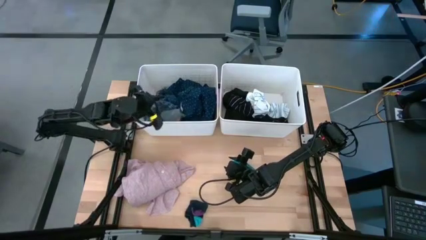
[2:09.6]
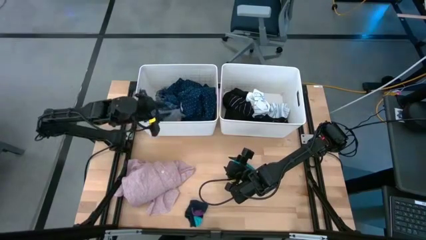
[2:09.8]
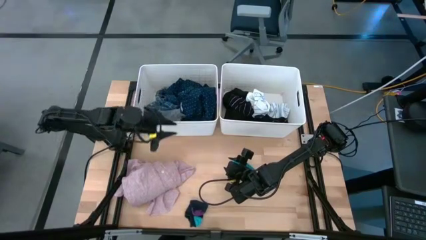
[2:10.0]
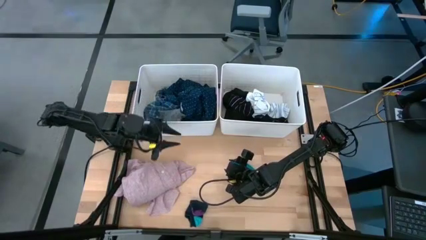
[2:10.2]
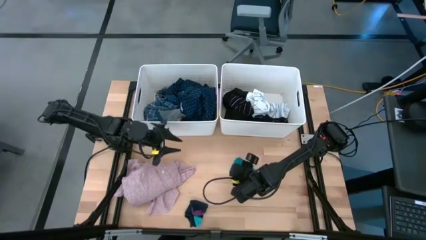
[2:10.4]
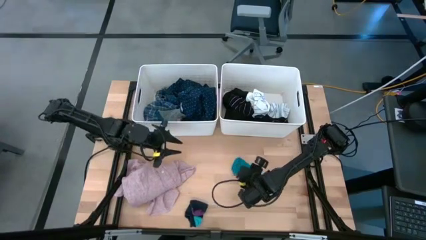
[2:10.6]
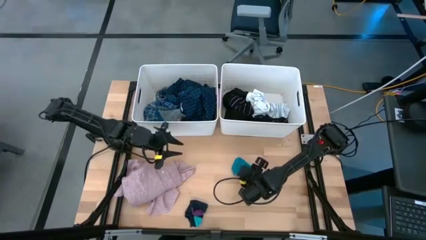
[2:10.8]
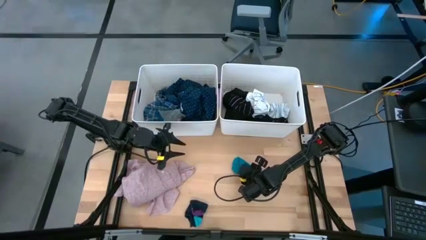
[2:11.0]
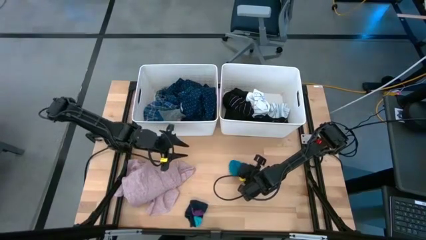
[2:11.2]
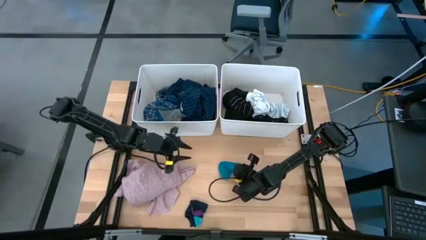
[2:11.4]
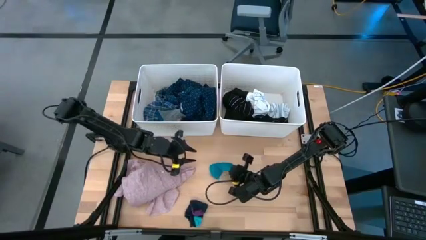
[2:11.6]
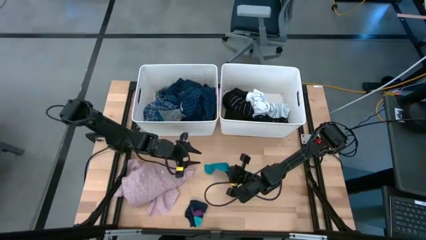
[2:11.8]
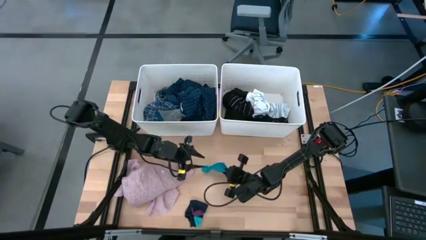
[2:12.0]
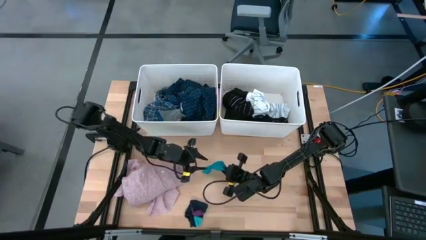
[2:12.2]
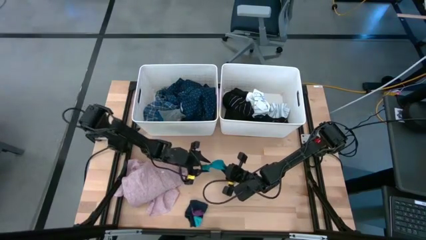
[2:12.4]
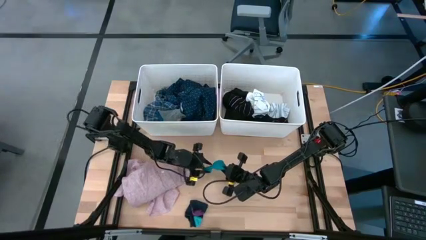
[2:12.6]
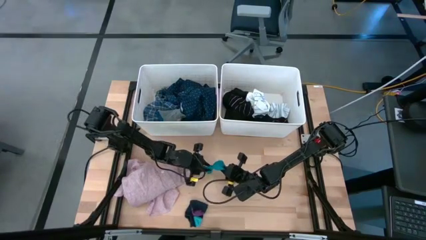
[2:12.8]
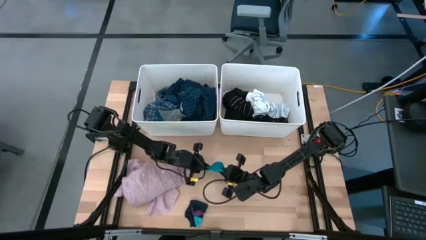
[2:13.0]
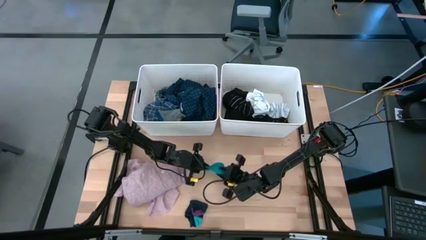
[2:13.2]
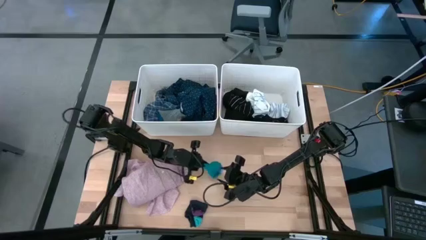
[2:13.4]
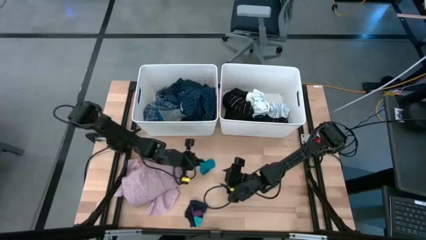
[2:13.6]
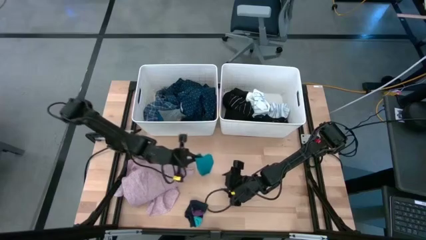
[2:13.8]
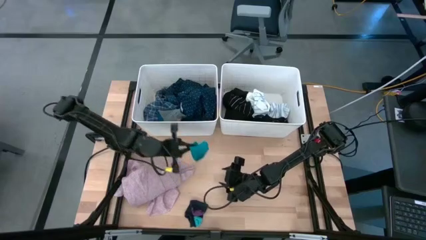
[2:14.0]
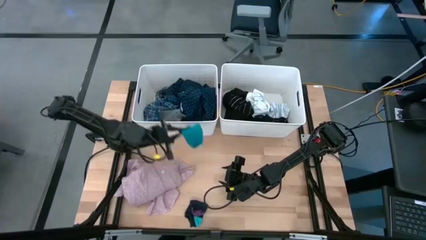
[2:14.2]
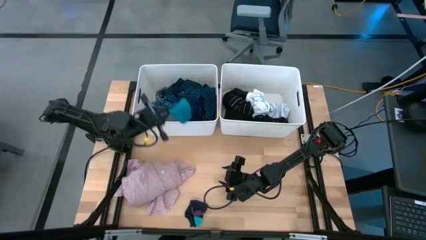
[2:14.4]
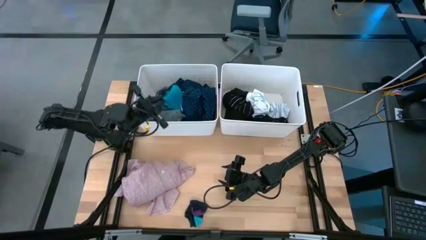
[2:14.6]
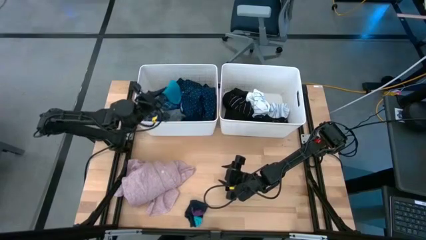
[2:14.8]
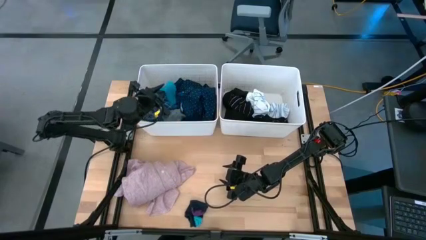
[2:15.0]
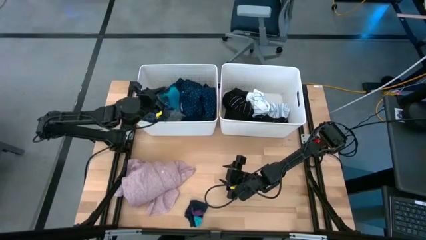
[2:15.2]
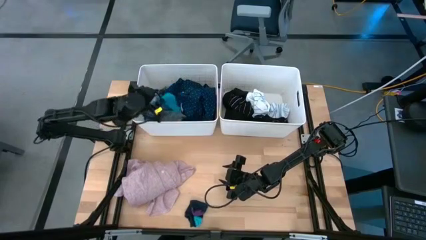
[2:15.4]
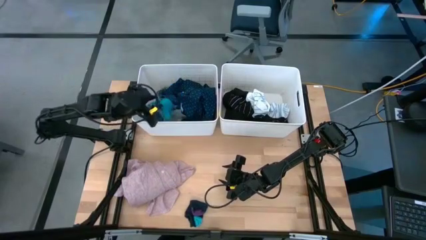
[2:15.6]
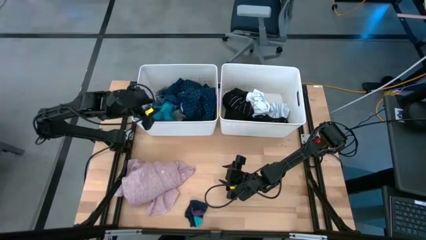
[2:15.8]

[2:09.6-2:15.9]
Task: Sort clothes
Put the blue sock into the left white bin

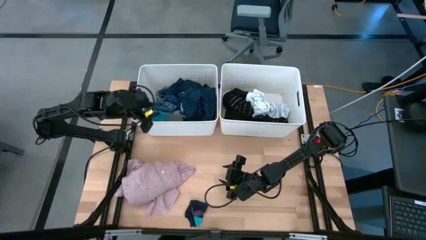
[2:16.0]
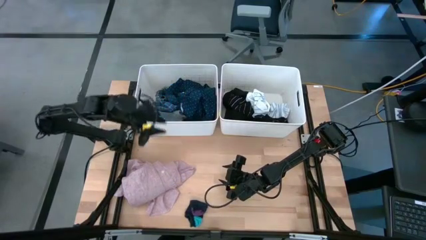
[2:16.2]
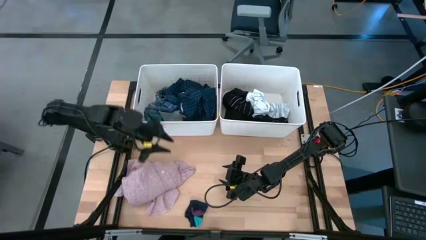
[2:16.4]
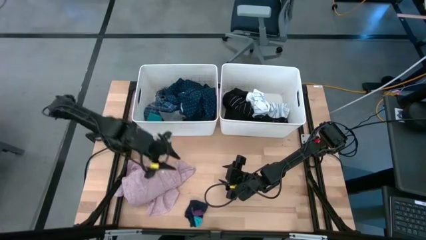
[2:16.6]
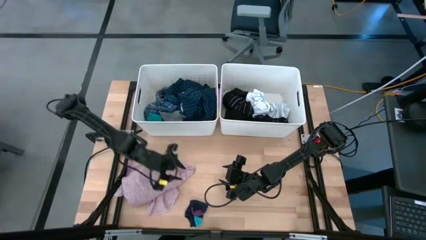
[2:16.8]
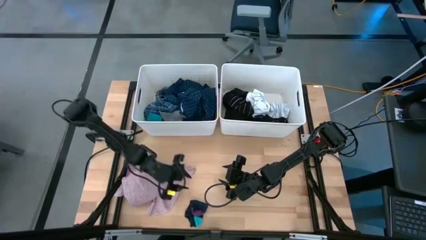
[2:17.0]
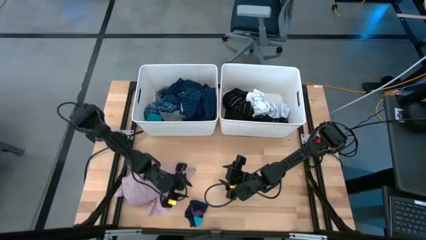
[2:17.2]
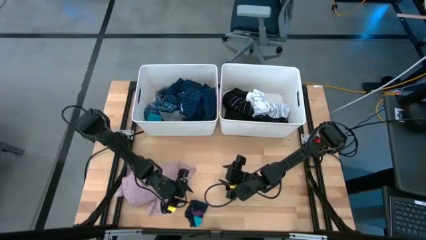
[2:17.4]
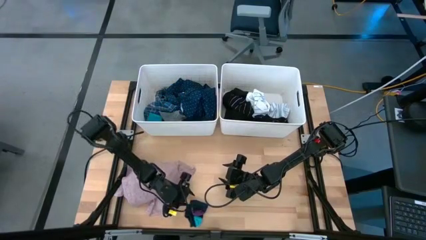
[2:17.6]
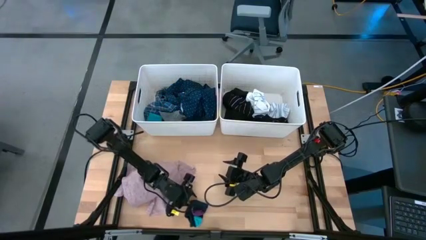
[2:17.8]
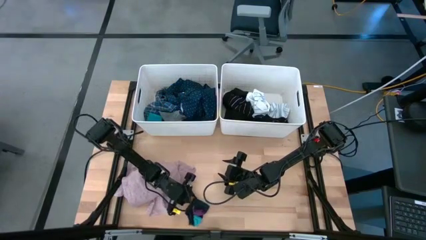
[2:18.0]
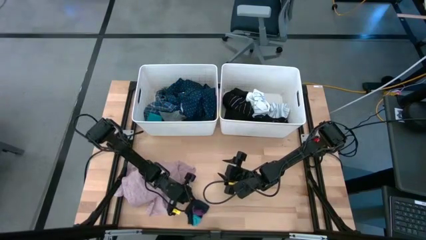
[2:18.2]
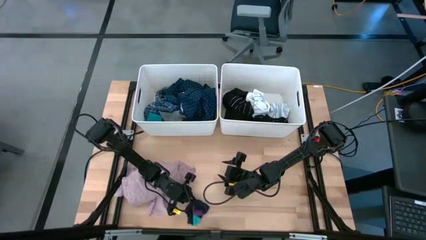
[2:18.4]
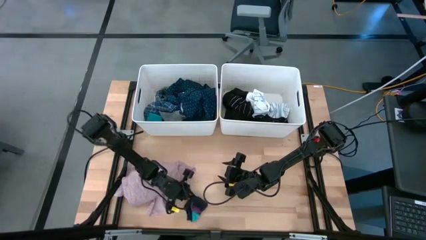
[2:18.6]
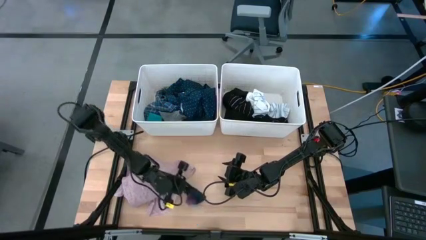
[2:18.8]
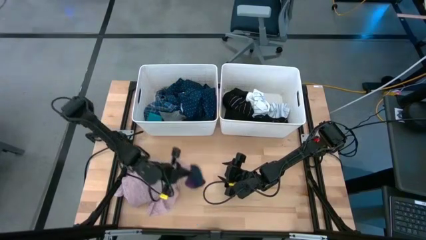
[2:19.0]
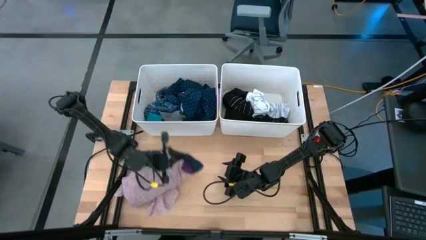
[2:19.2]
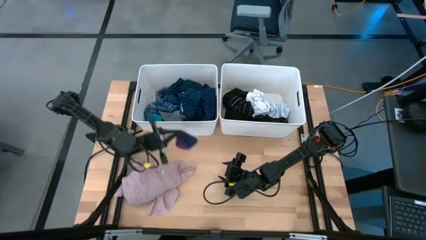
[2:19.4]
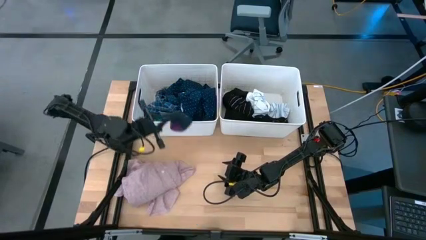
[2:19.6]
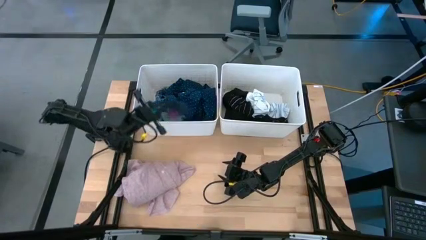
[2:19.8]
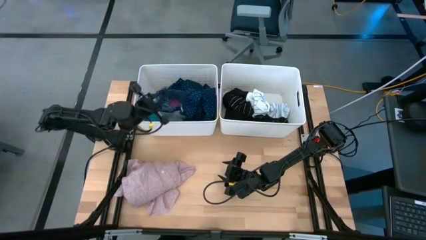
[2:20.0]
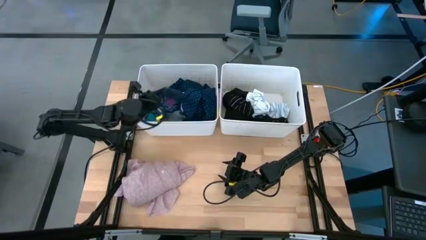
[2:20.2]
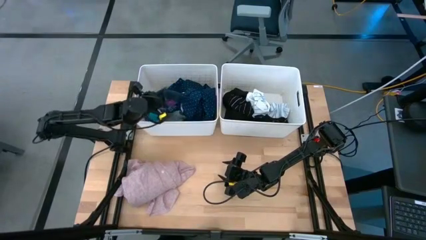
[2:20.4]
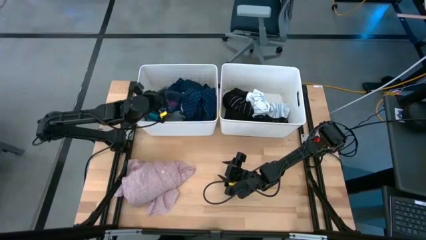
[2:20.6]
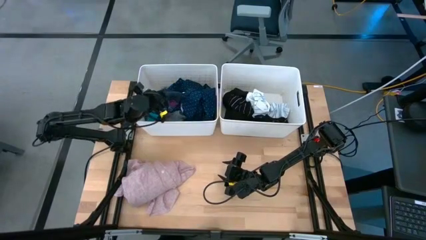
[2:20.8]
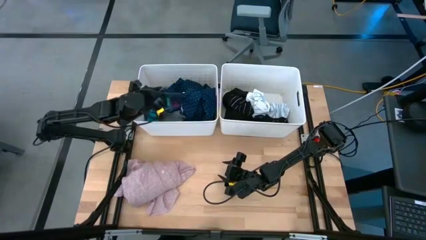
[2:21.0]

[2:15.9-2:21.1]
Put the dark blue sock into the left white bin

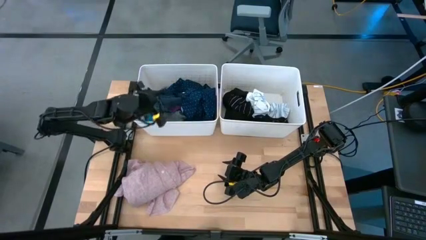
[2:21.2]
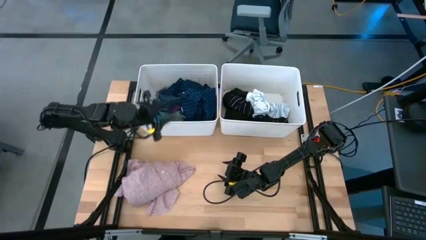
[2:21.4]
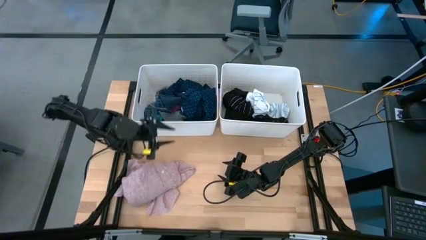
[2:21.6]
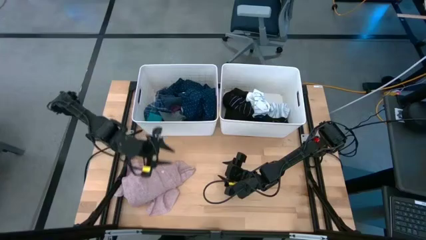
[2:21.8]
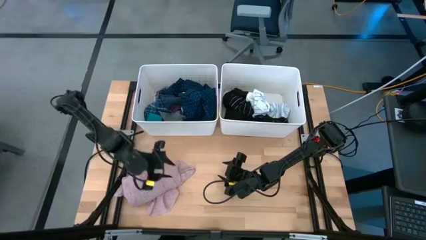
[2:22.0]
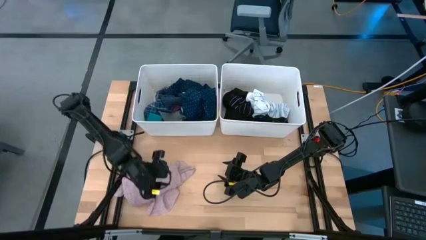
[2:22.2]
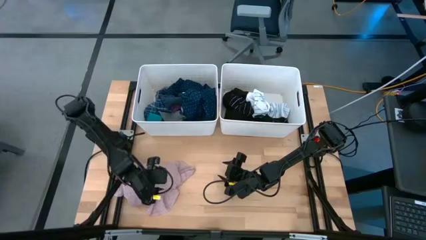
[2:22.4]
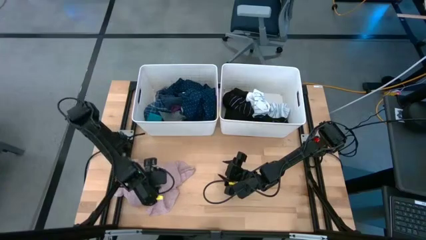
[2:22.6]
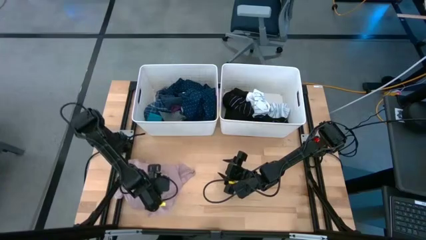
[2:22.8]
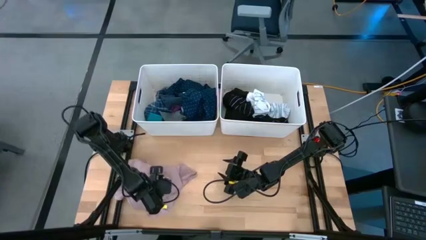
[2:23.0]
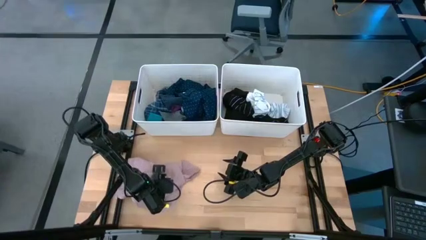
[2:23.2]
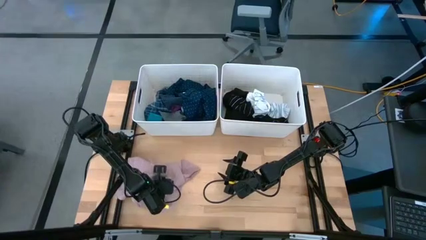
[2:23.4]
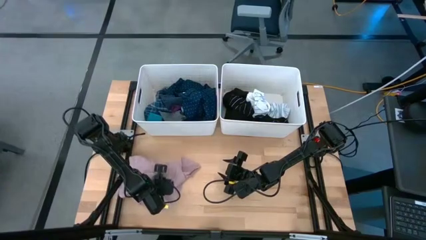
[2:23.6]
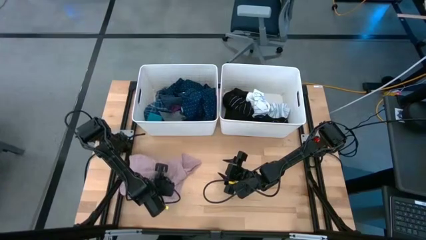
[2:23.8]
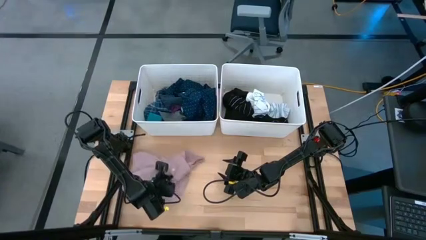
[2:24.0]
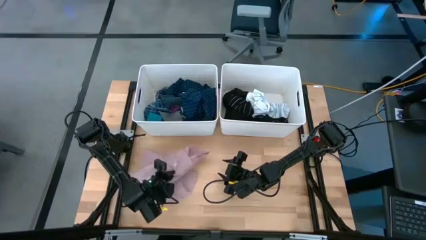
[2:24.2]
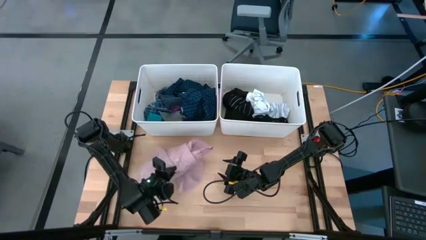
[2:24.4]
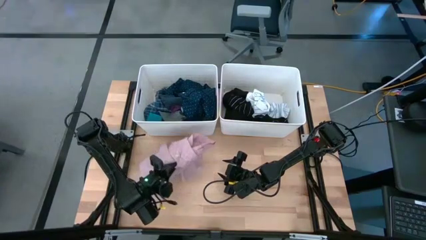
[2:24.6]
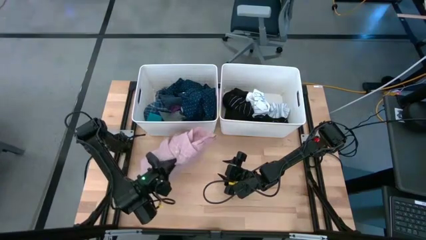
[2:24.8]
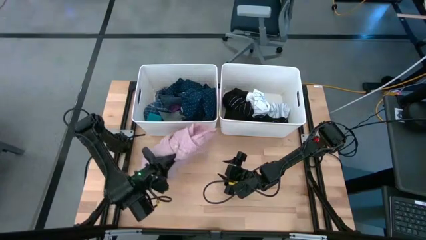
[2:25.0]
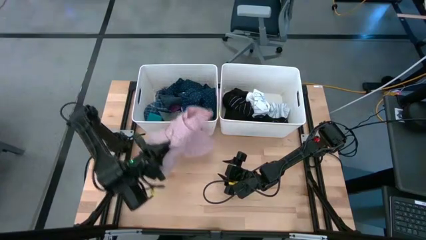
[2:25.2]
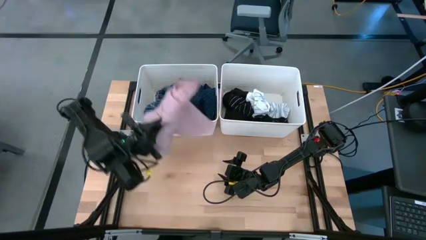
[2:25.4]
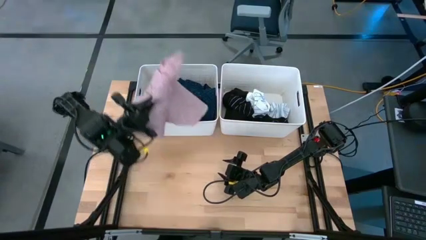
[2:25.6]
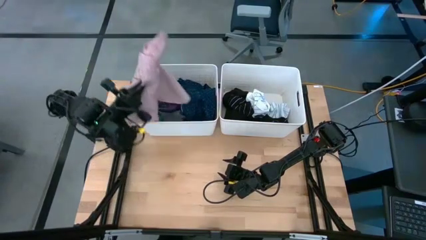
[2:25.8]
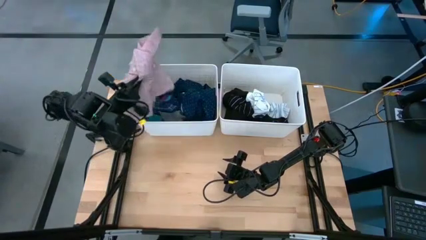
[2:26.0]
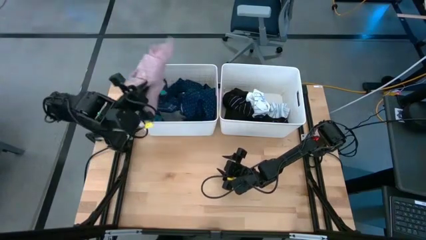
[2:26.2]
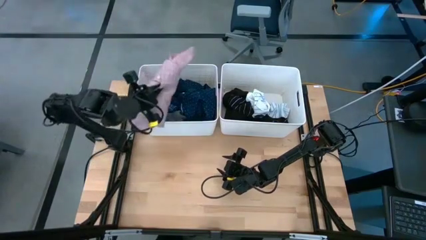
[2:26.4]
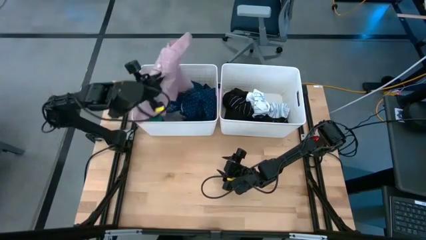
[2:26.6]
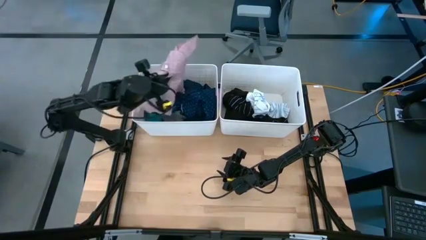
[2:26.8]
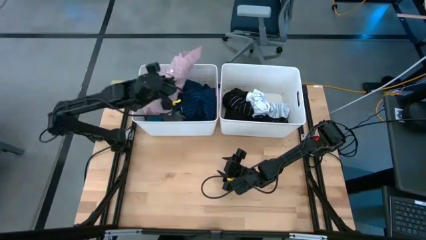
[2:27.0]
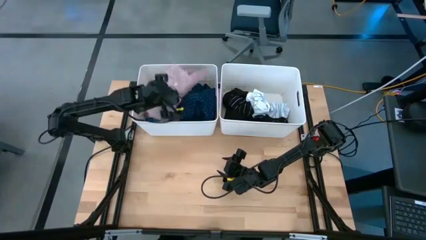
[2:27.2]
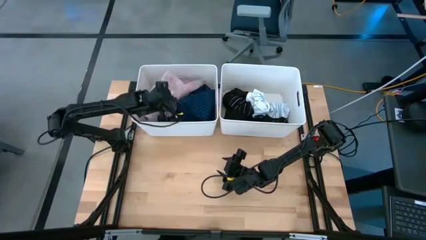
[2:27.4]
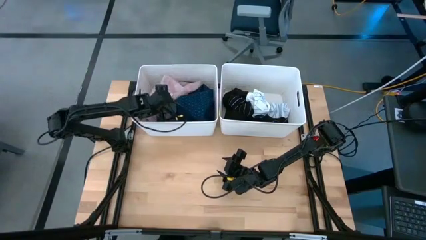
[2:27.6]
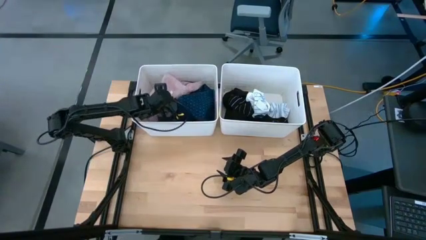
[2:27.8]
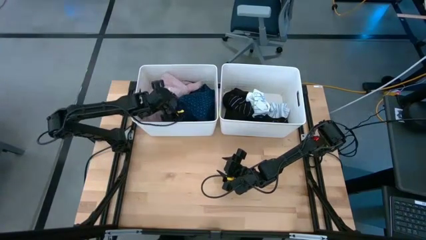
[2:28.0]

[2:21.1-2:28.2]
Put the pink shirt into the left white bin
